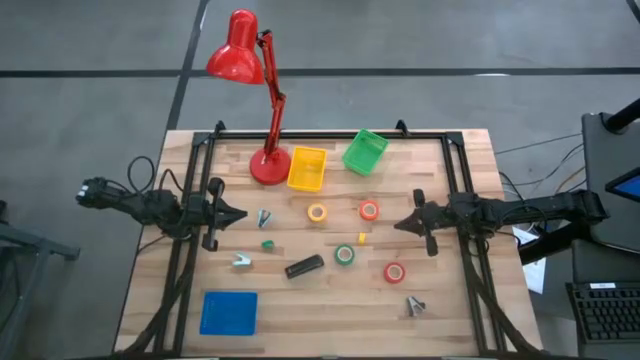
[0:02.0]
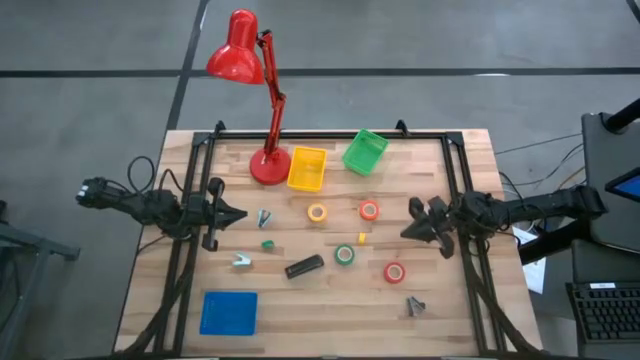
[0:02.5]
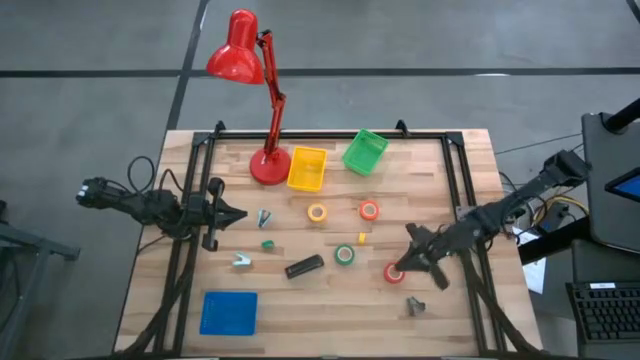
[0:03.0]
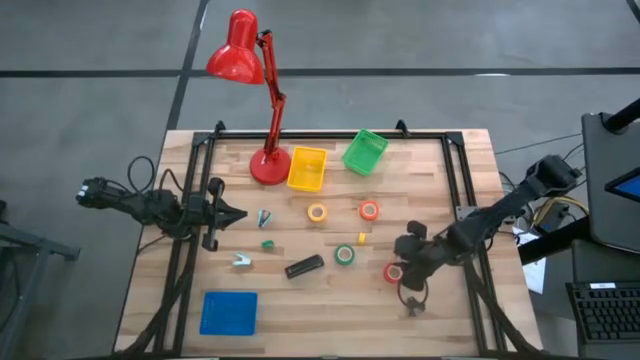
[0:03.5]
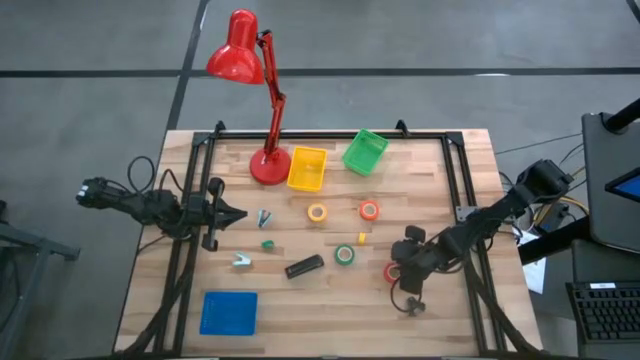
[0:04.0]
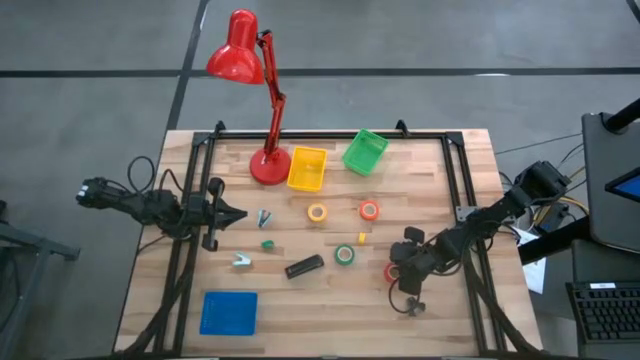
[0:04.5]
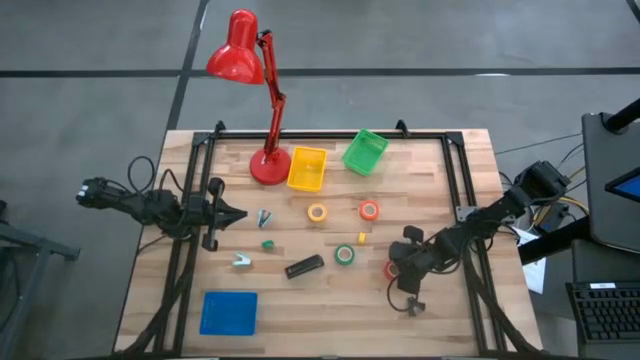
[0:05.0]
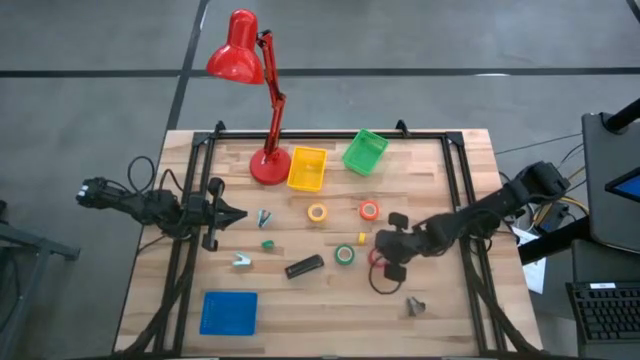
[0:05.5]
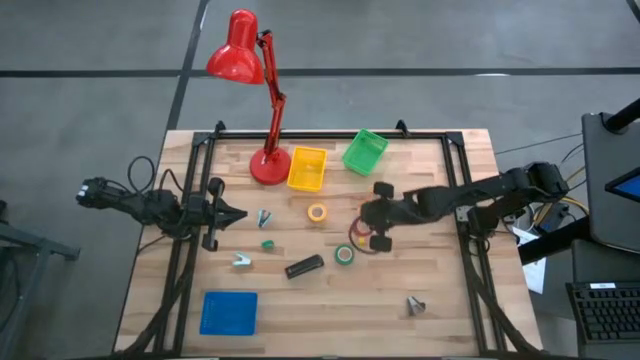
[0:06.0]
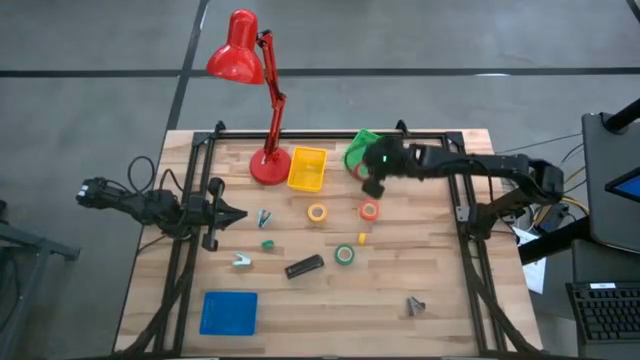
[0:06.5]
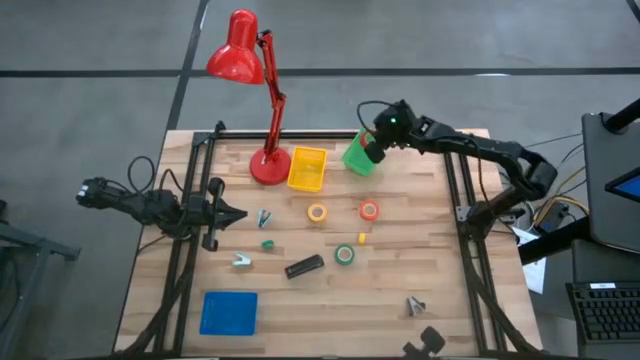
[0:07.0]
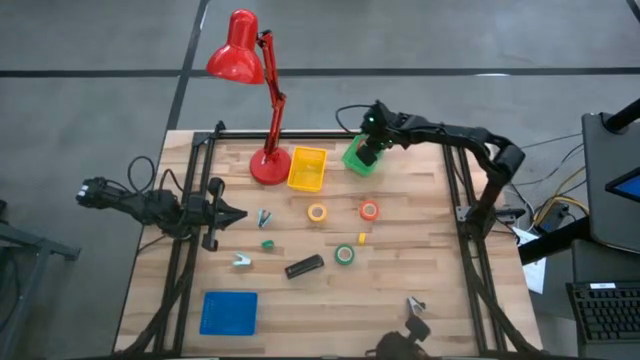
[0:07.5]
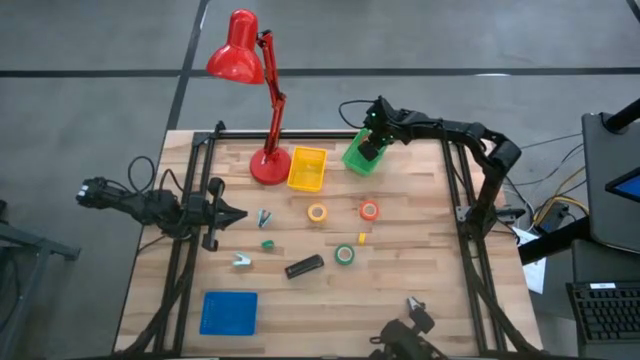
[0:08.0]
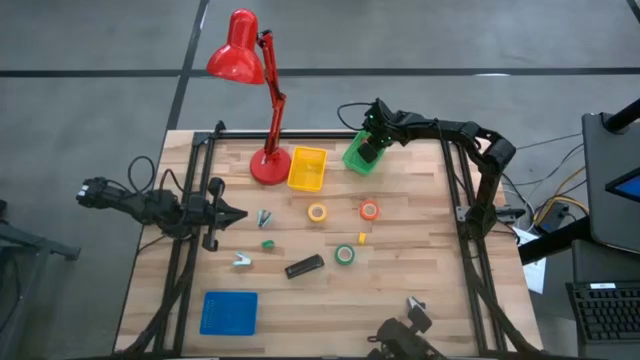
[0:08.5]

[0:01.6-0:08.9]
Task: Pick and place Stapler, Stapler remover, tape
Put the red tape into the green bin

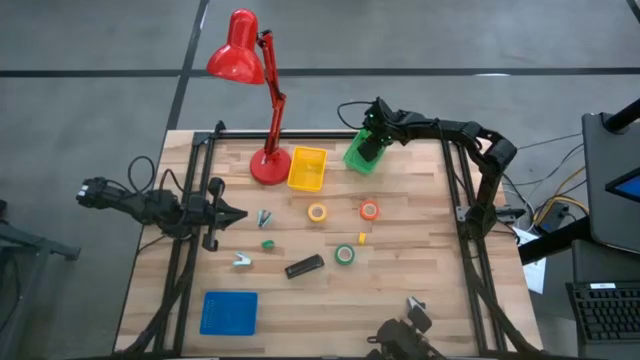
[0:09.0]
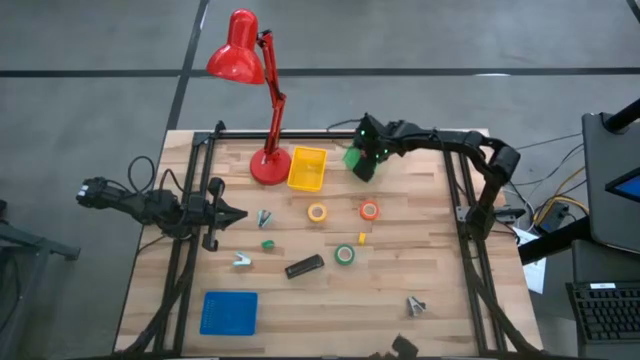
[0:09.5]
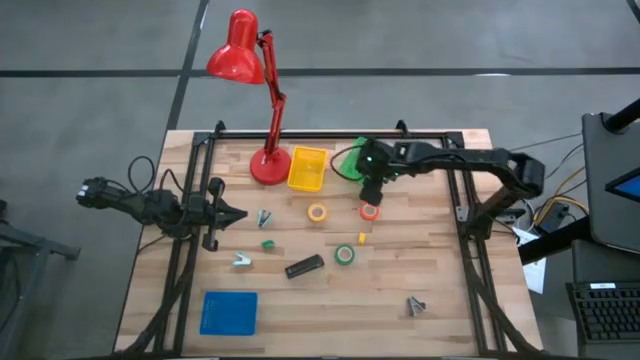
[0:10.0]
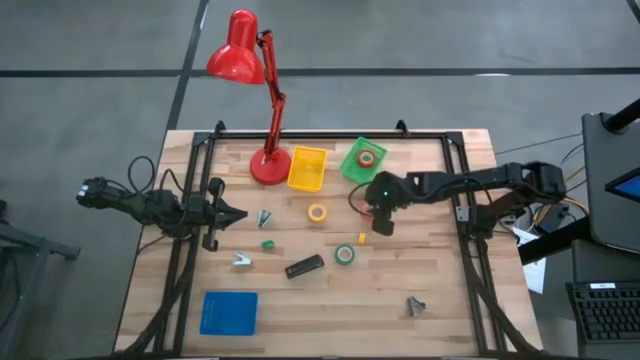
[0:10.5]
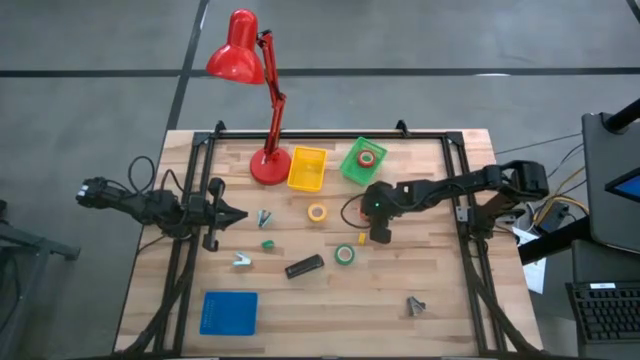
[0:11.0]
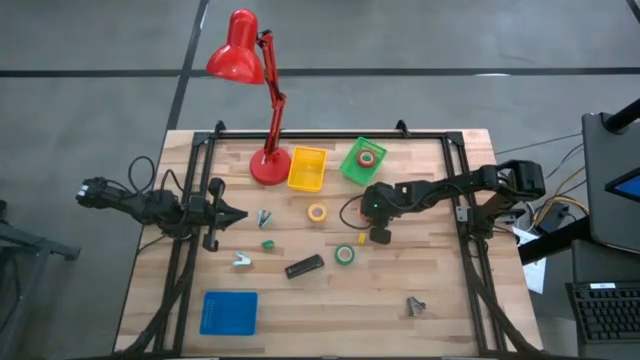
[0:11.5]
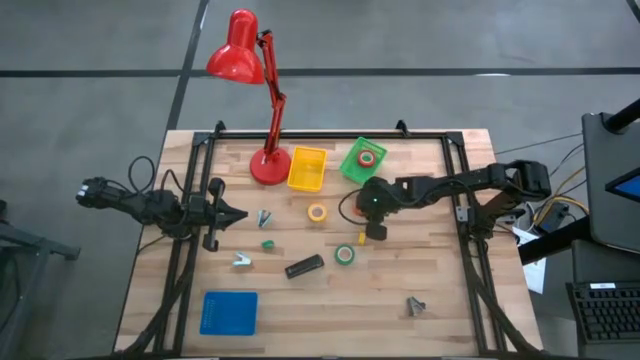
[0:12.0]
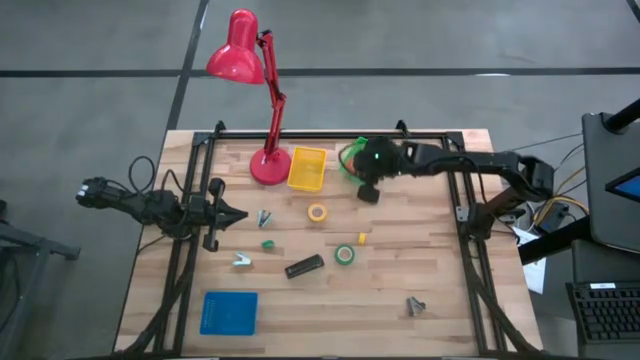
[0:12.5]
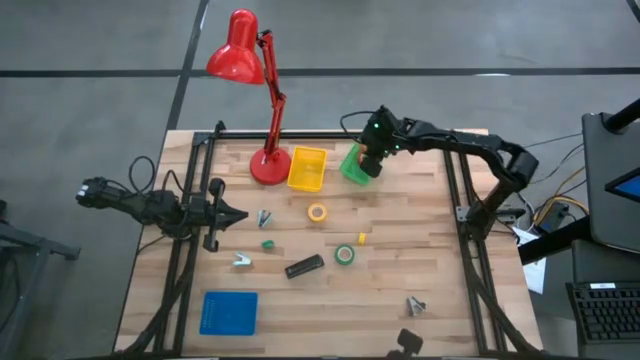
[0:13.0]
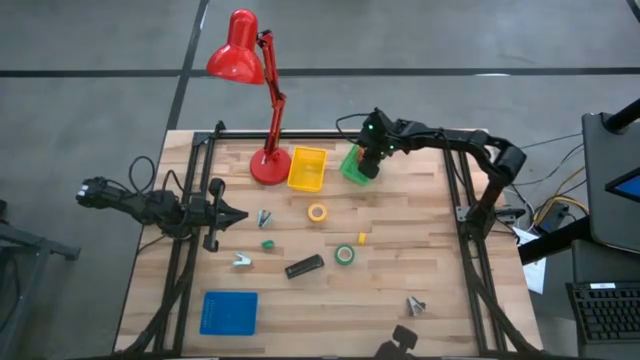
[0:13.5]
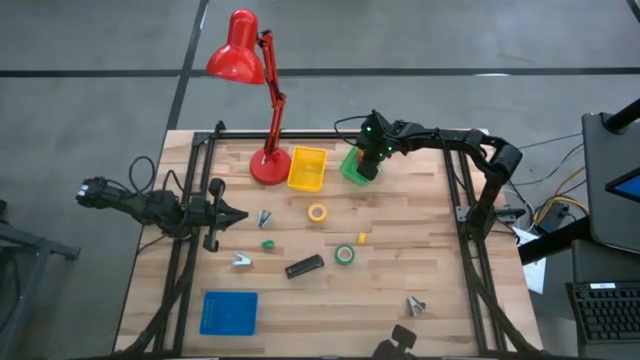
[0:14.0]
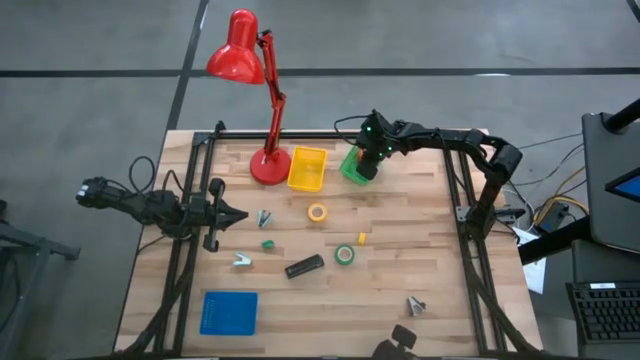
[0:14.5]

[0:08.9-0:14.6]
Put the orange tape into the green bin

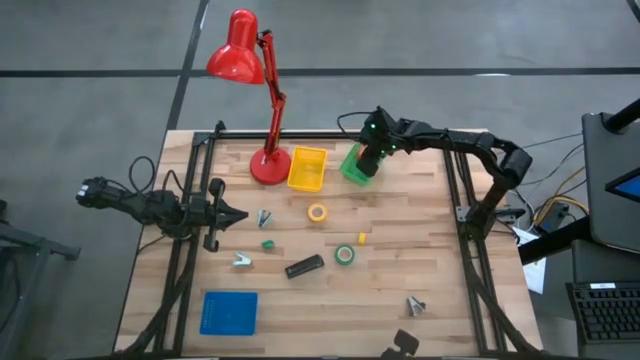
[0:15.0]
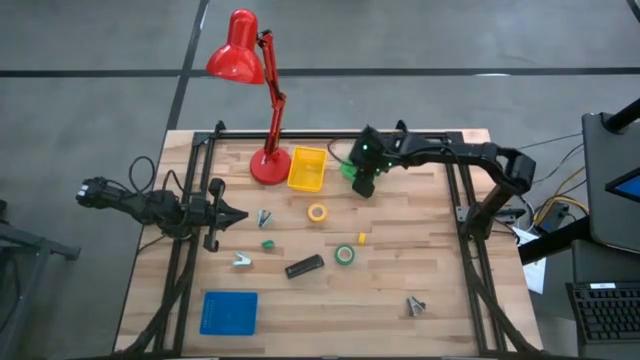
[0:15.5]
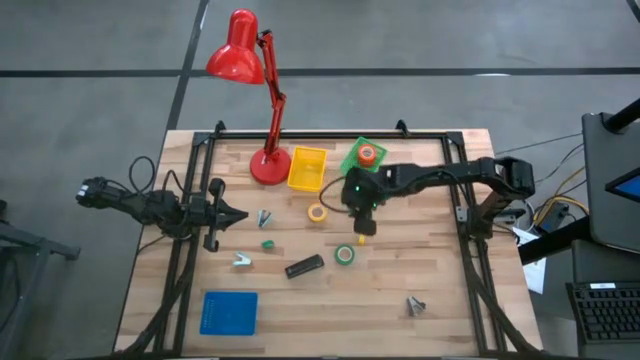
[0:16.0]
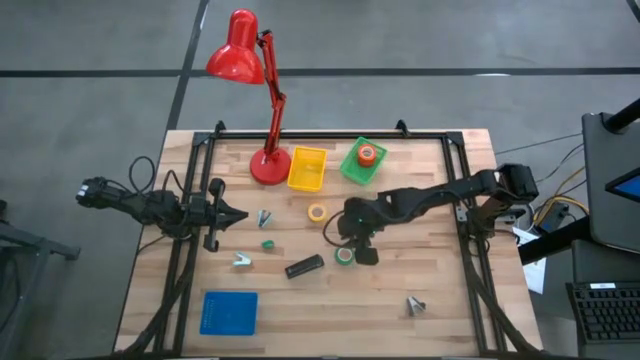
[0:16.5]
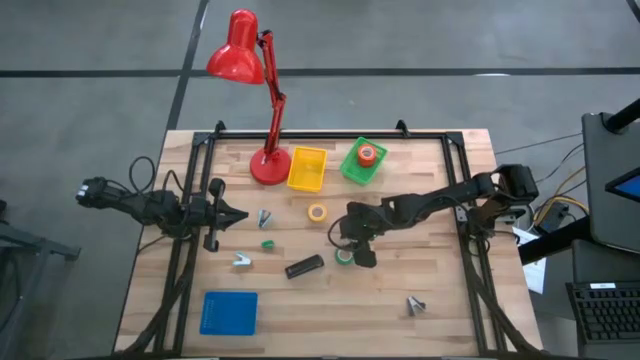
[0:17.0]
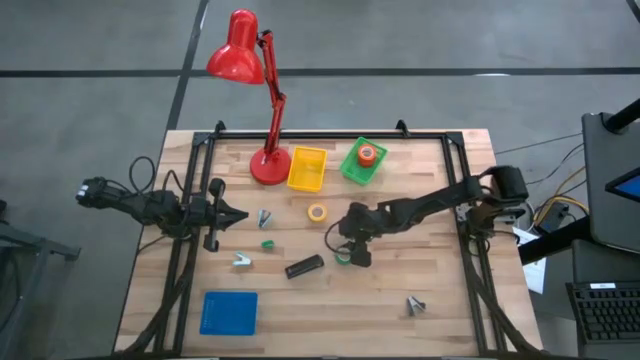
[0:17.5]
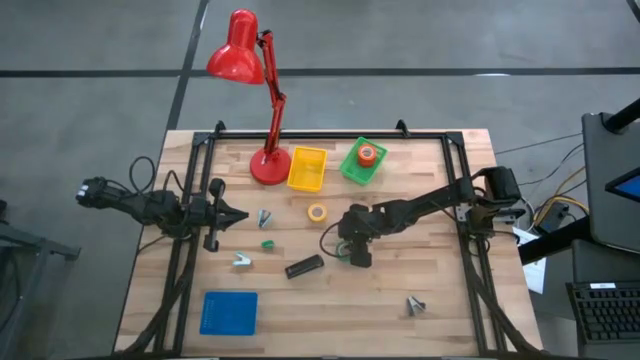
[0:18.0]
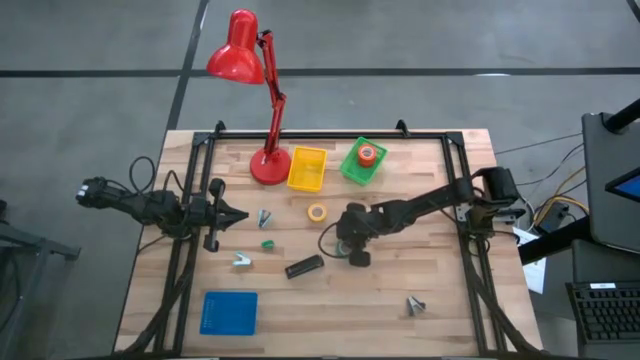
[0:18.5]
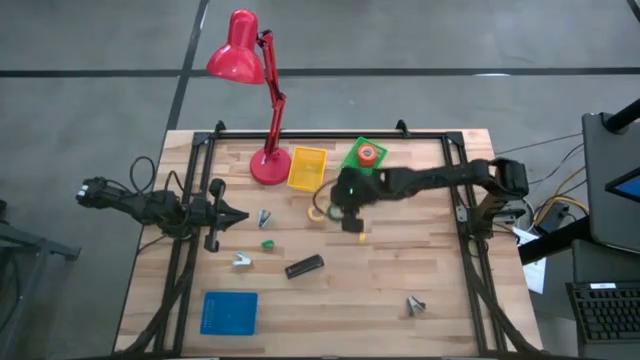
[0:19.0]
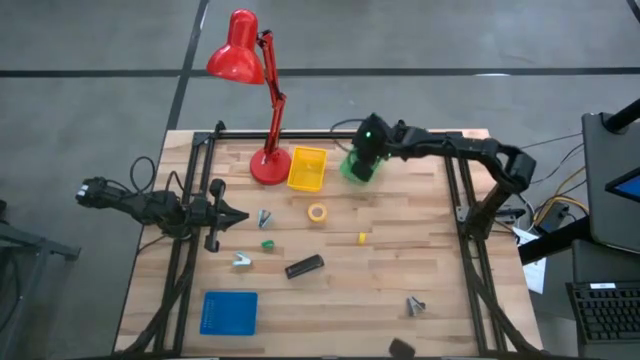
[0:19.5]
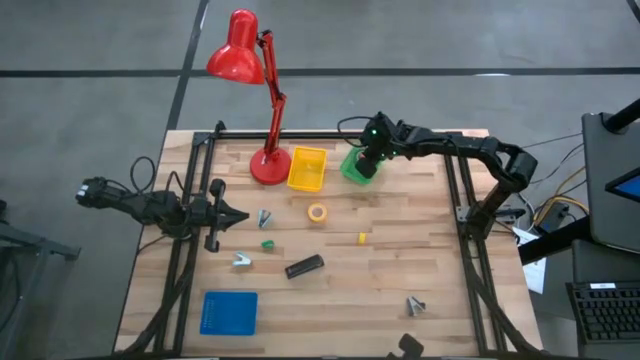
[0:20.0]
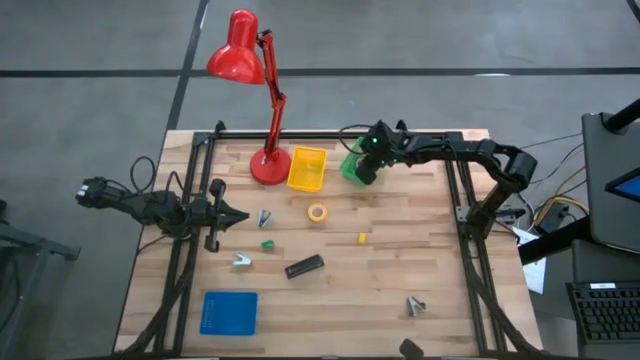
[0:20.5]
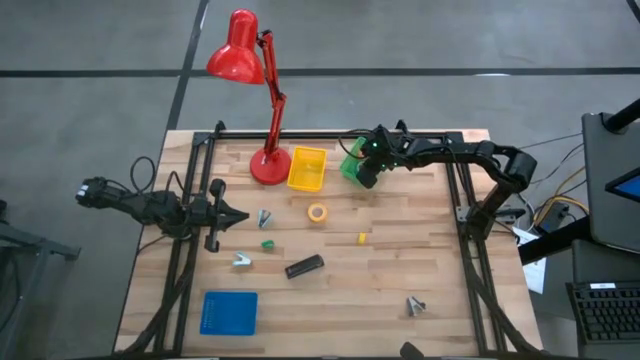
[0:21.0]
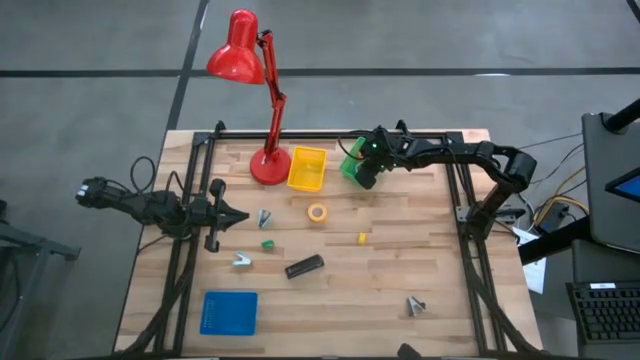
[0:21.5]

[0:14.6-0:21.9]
Put the green tape into the green bin

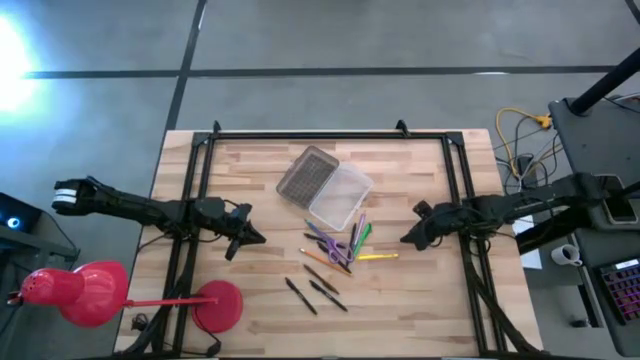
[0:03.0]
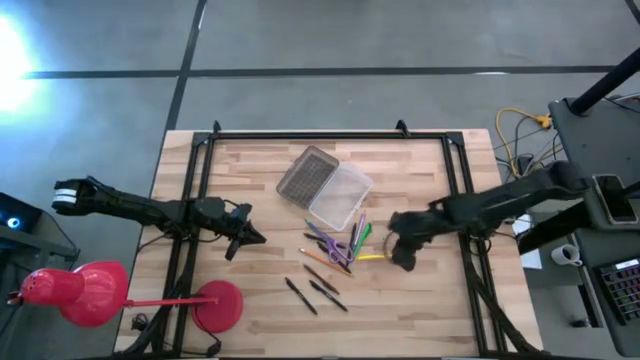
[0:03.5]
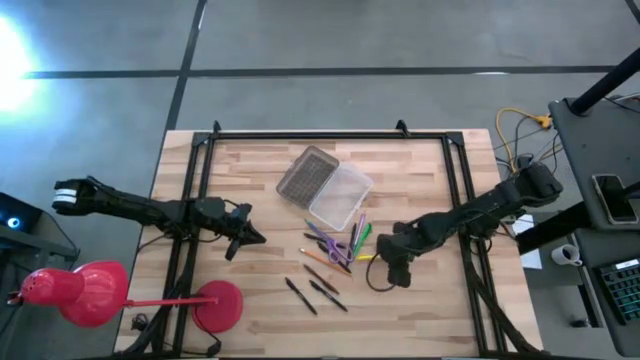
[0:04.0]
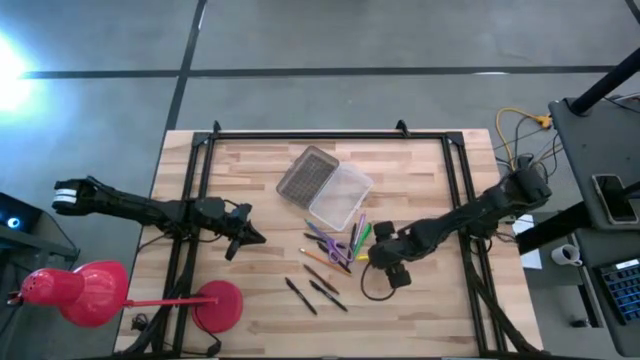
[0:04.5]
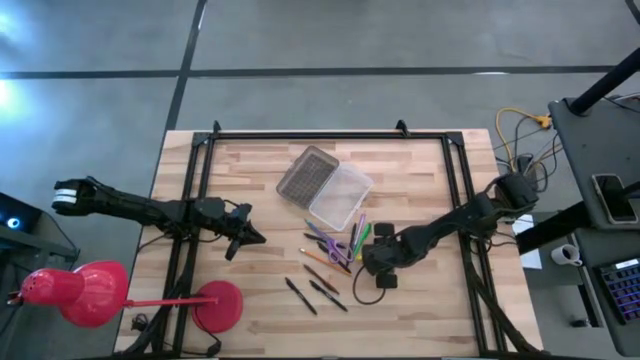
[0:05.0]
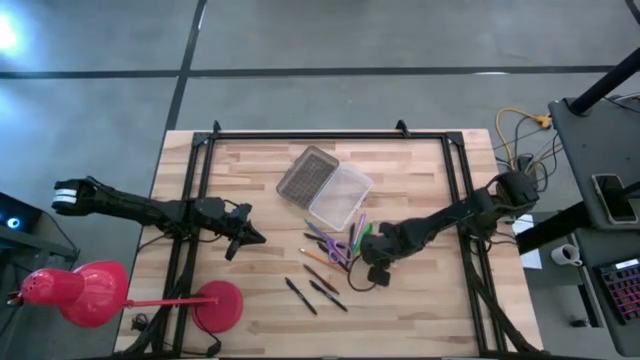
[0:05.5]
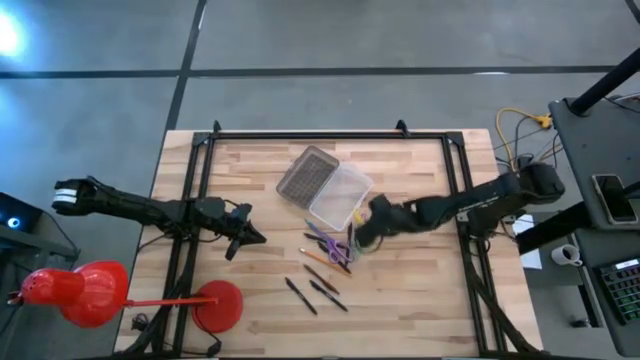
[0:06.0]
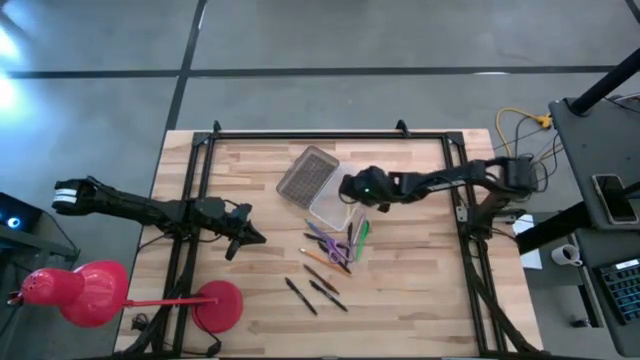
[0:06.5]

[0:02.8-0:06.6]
Task: Pick & place school supplies into a supply box
Put the yellow pen into the supply box
